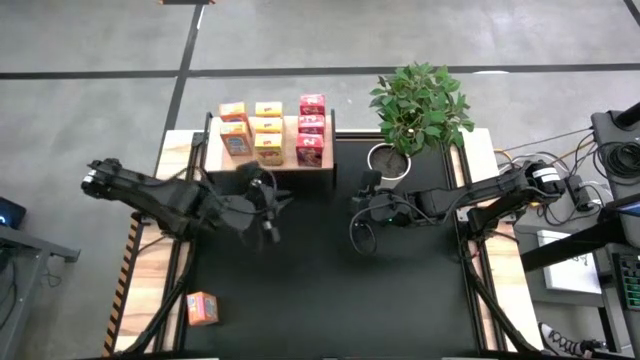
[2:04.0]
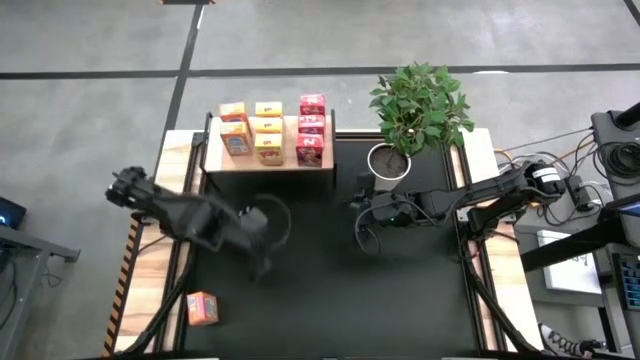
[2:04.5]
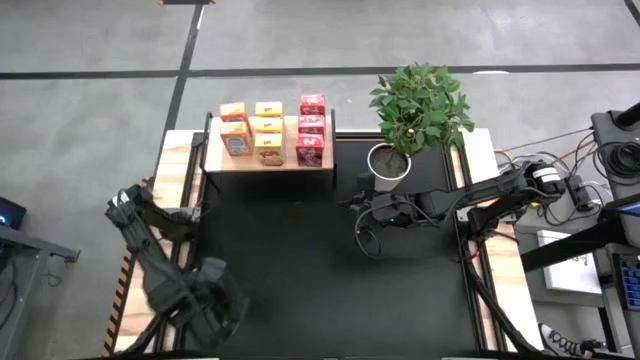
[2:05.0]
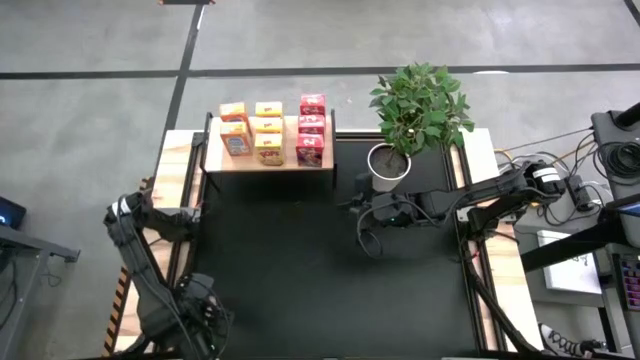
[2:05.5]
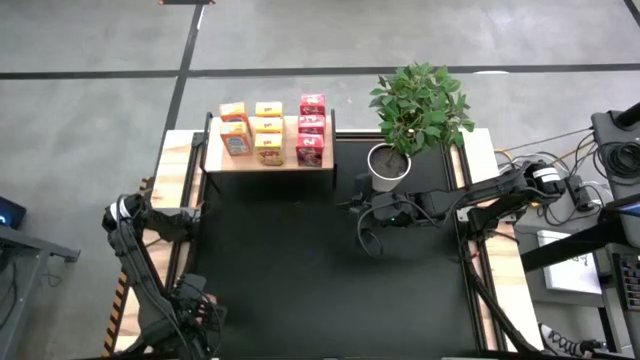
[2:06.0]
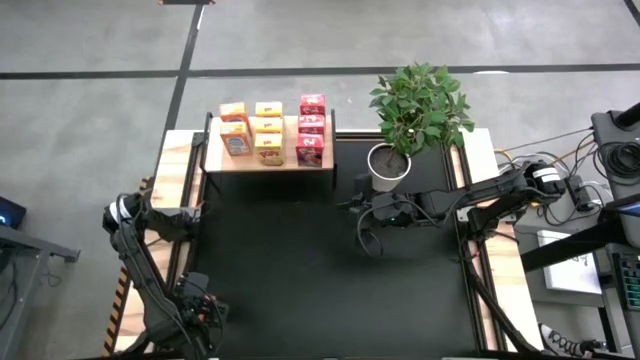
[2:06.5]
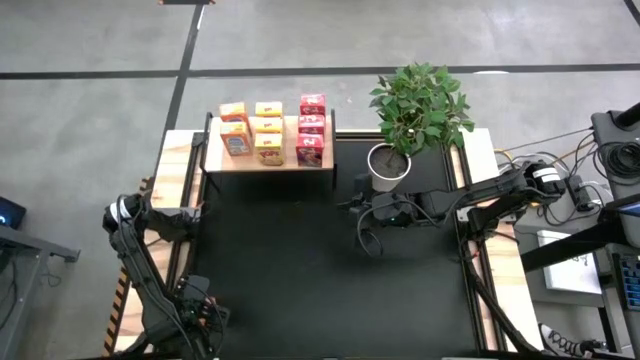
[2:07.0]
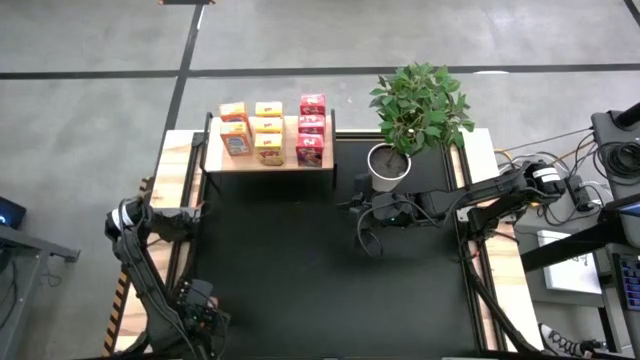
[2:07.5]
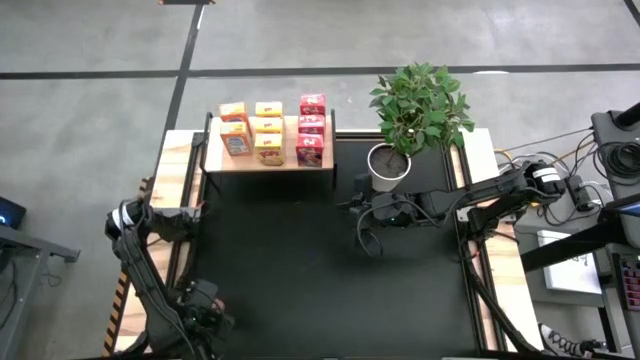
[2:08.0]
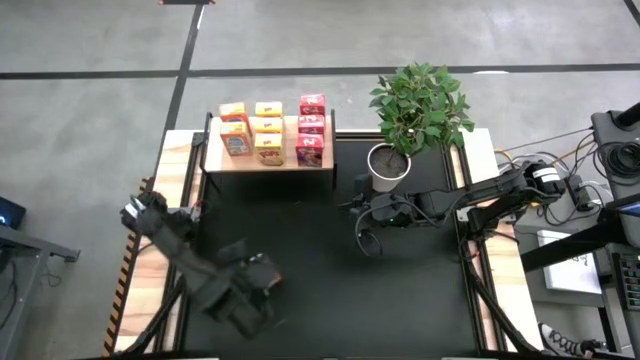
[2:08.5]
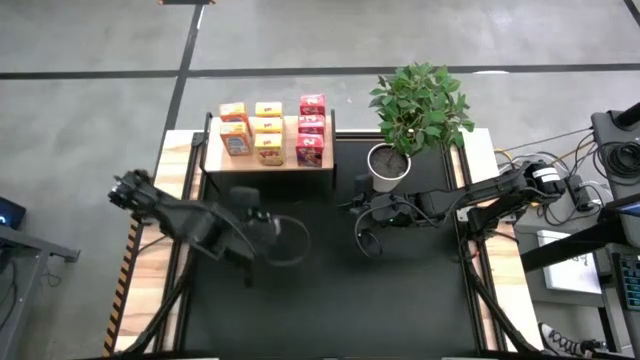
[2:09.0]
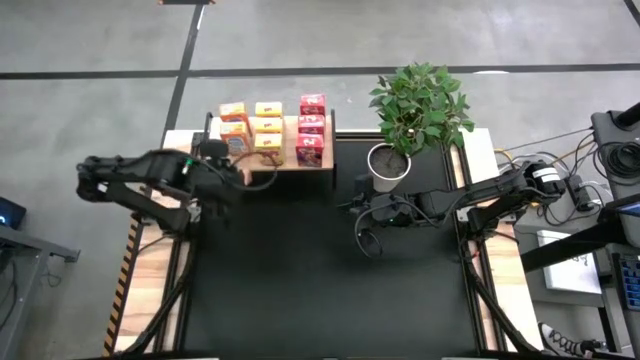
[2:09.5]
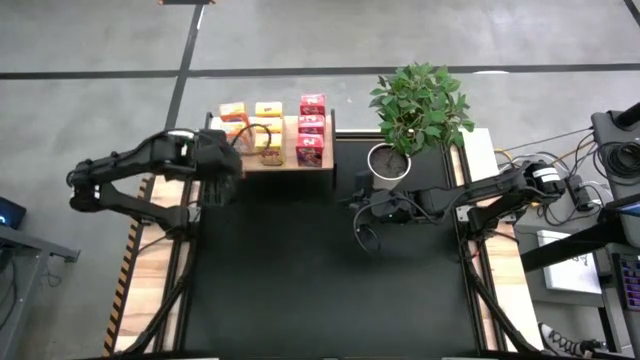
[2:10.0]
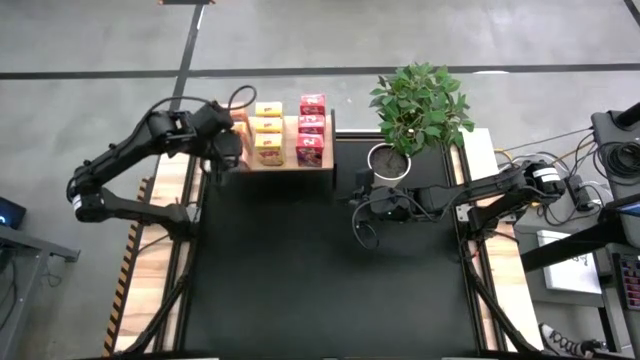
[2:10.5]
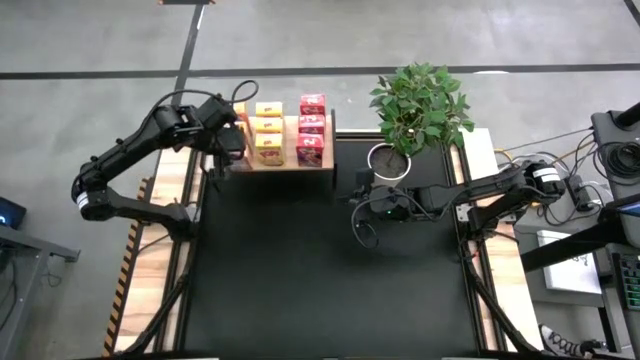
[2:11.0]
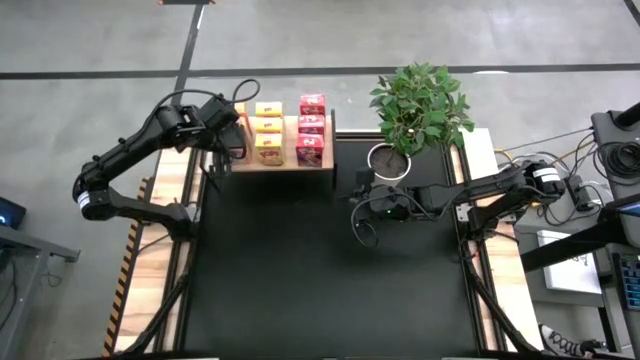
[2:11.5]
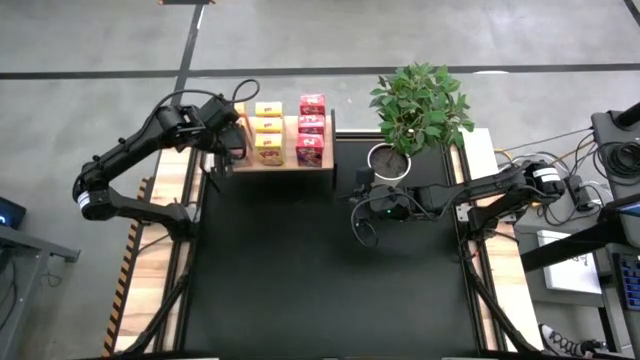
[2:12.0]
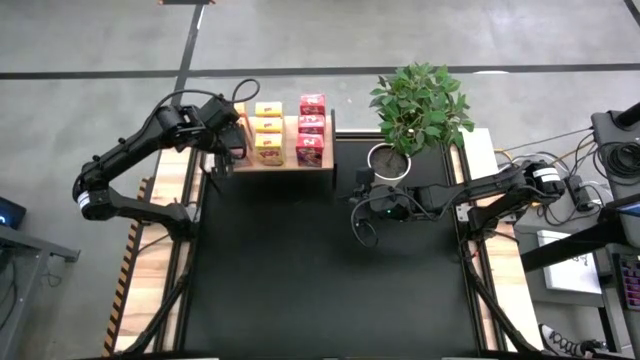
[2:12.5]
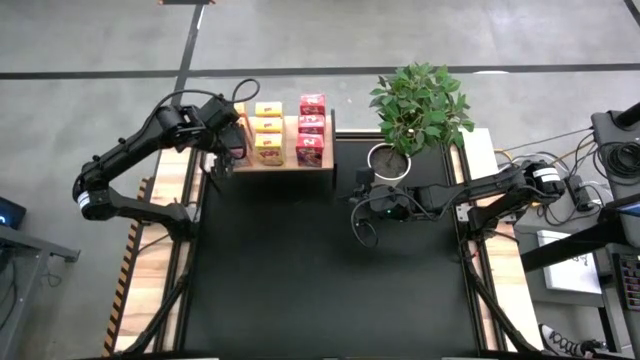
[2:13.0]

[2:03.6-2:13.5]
Task: Stack cereal on shelf
Put the bottom orange cereal box on the shelf

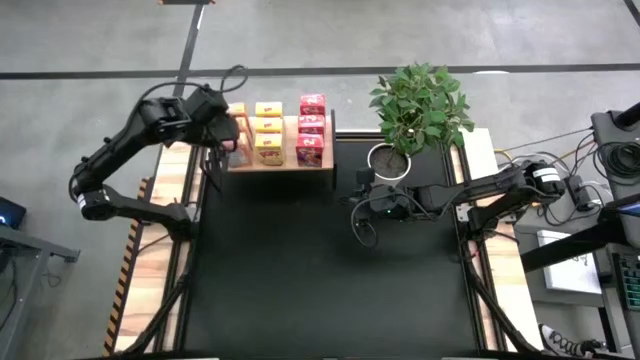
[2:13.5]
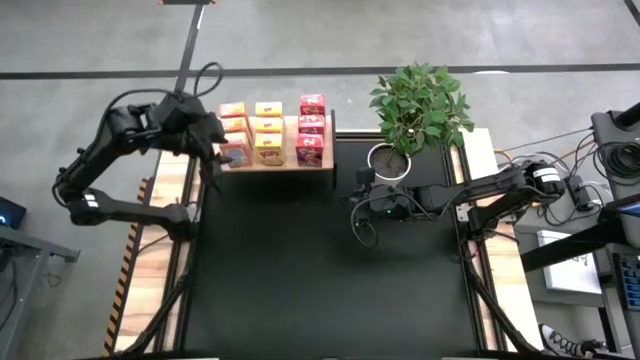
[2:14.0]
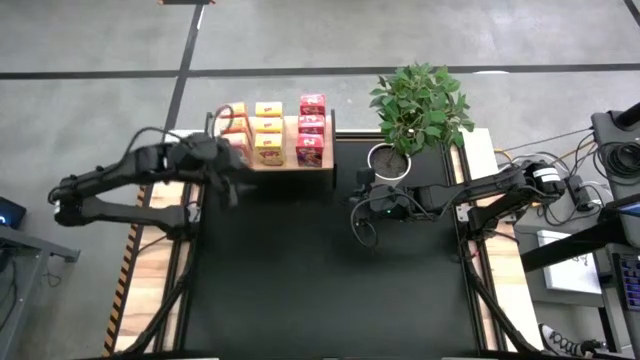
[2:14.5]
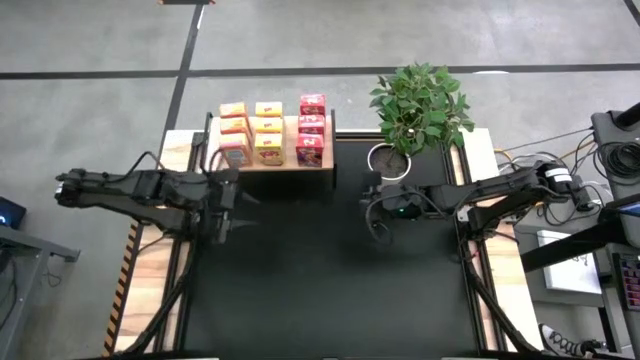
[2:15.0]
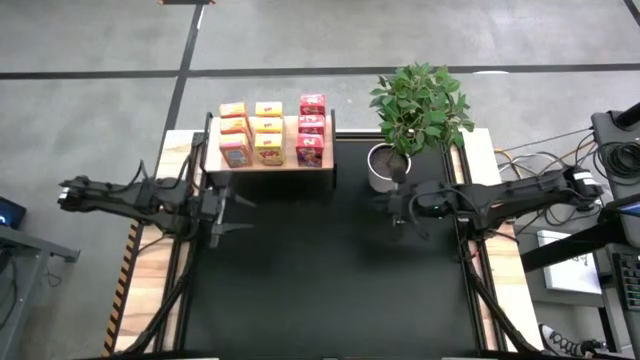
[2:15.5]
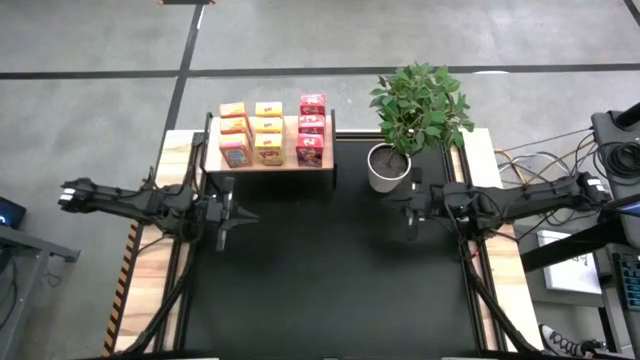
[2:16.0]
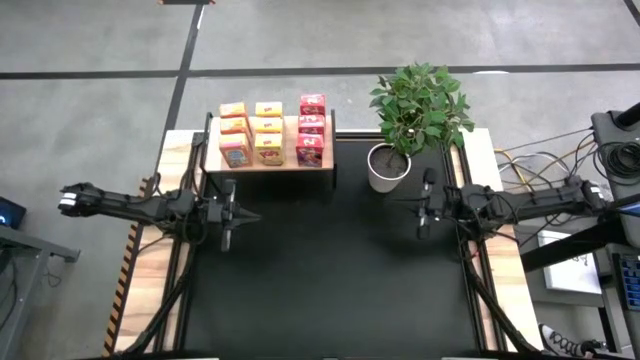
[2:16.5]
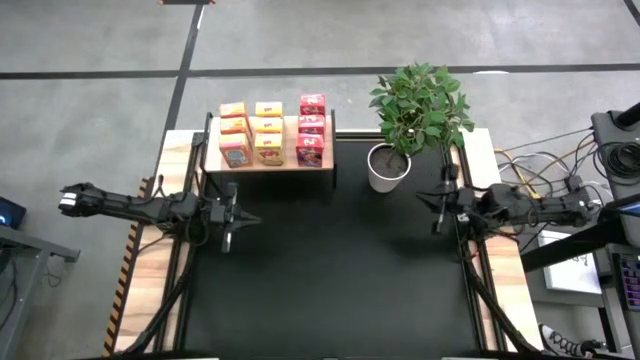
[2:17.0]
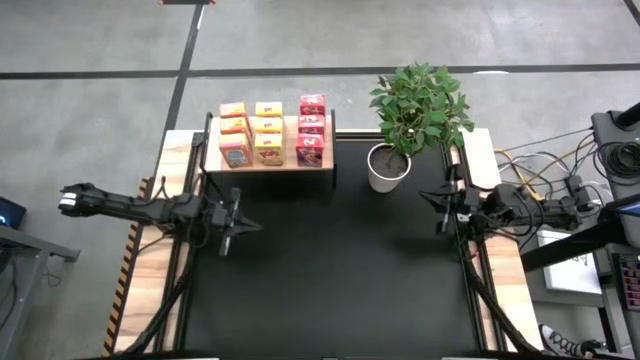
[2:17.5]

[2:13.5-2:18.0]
Return to Home Position

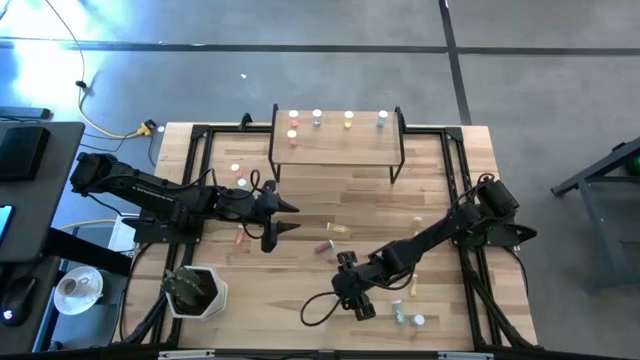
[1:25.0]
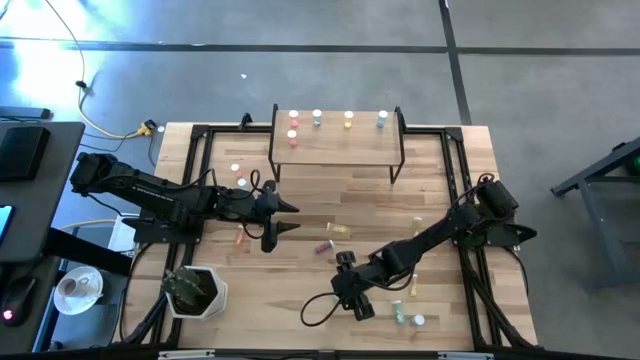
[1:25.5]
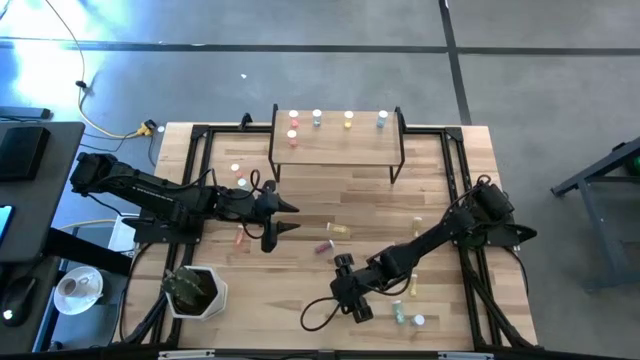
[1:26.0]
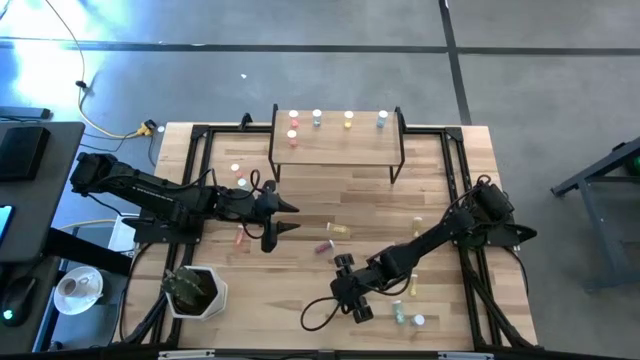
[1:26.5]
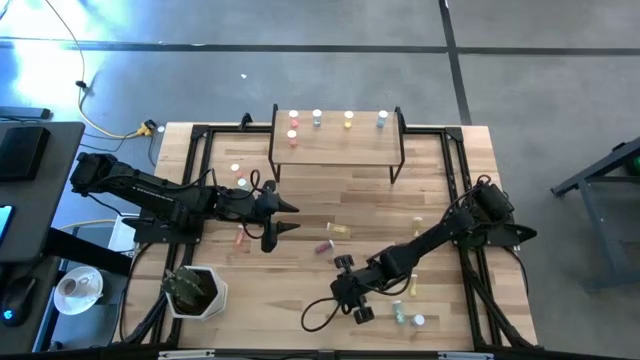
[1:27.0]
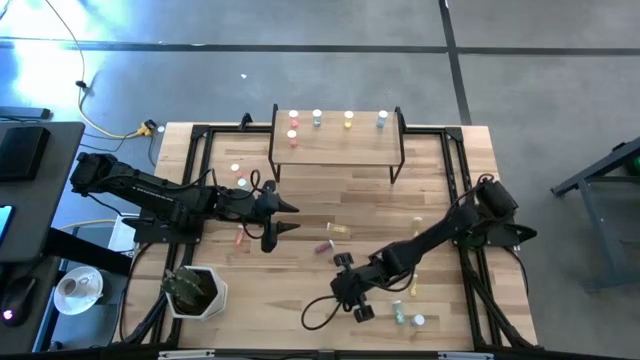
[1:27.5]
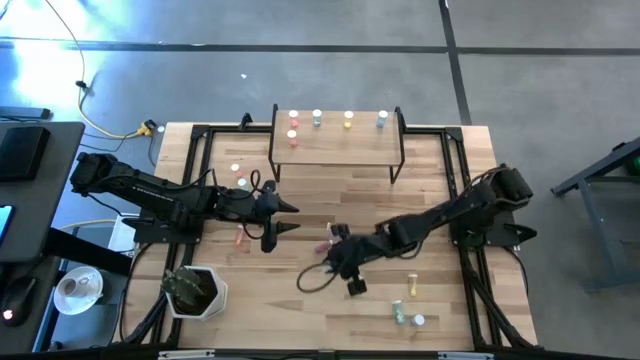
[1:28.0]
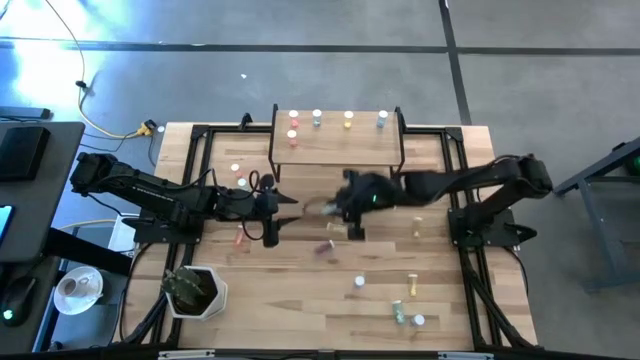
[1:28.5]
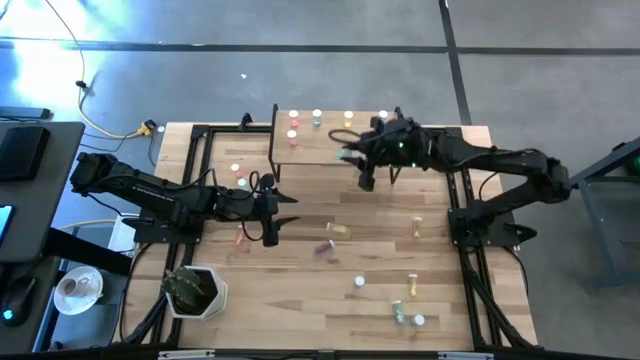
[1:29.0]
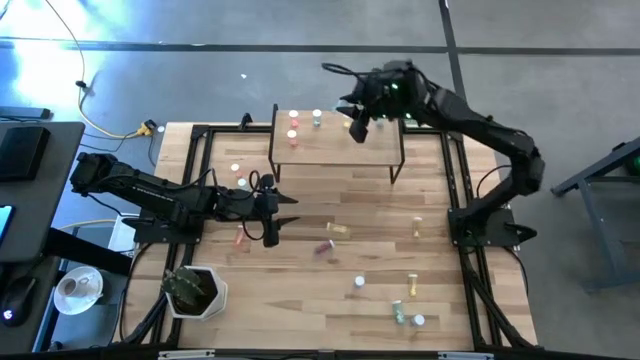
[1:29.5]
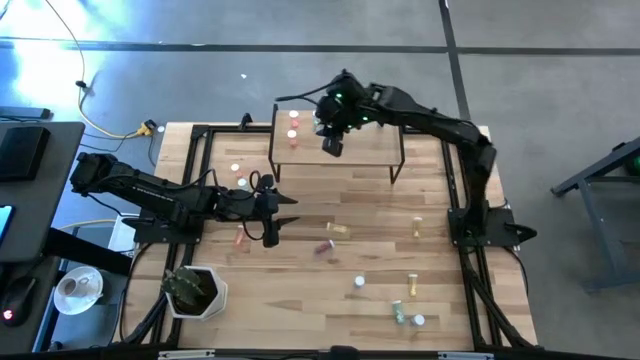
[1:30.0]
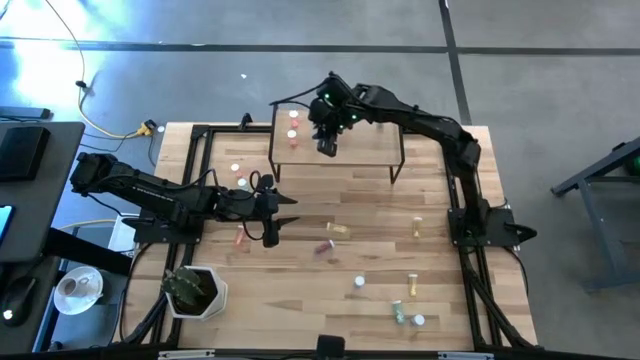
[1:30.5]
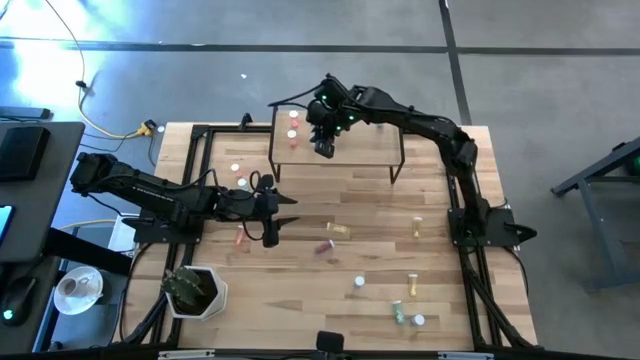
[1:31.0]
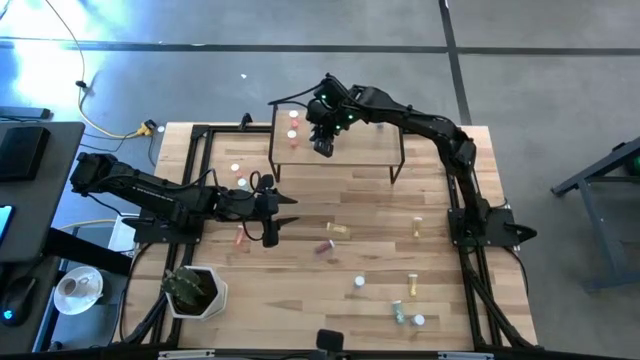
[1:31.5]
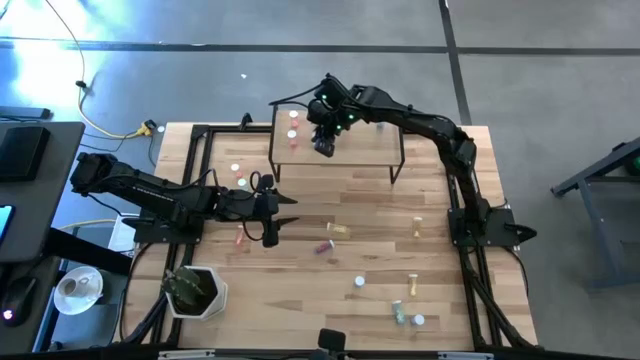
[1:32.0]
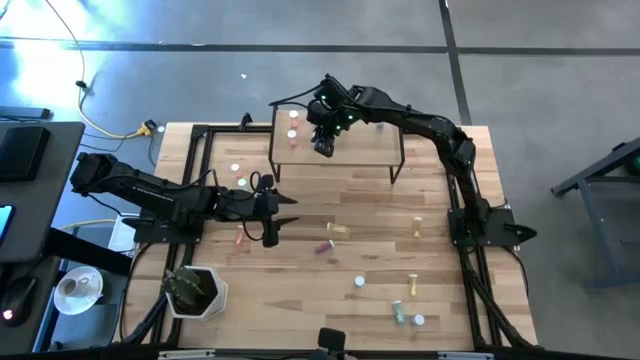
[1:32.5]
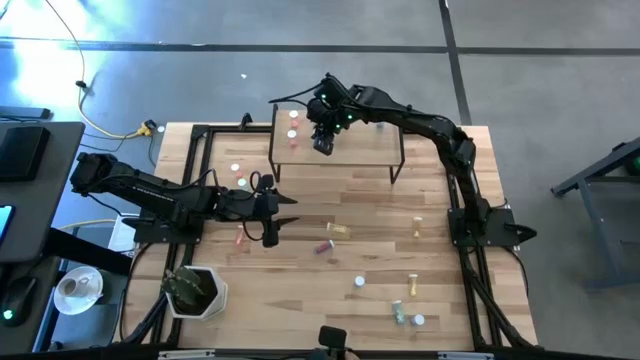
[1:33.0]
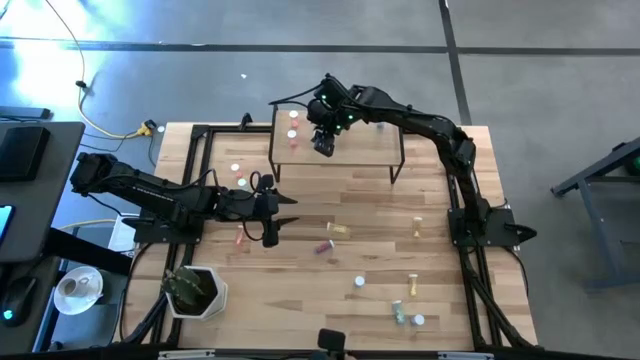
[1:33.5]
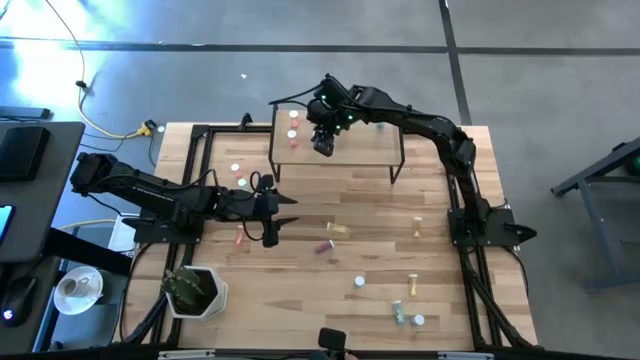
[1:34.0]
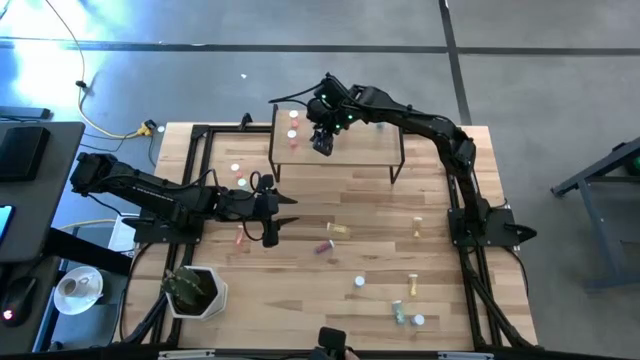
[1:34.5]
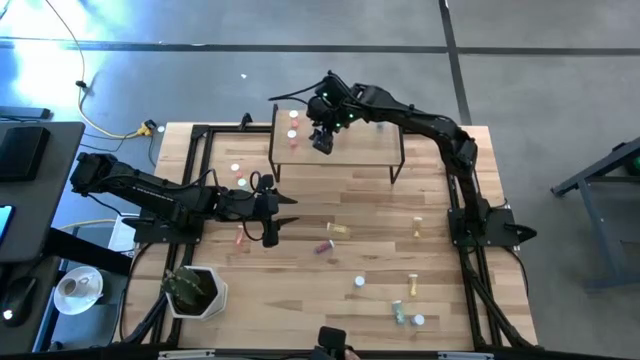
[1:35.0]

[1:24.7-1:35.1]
Task: Pick and place medicine bottles onto shelf by color
Put the light blue medicine on the shelf
